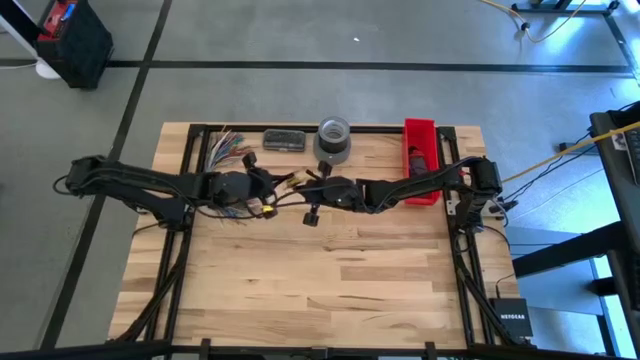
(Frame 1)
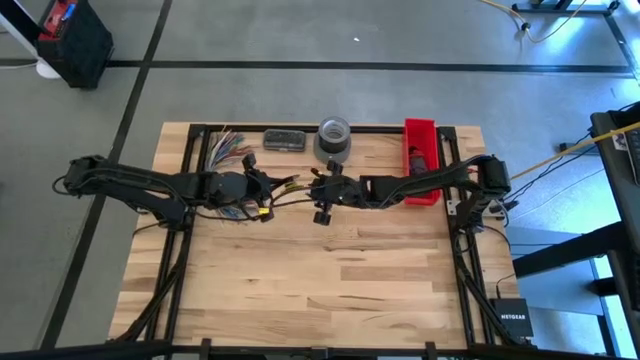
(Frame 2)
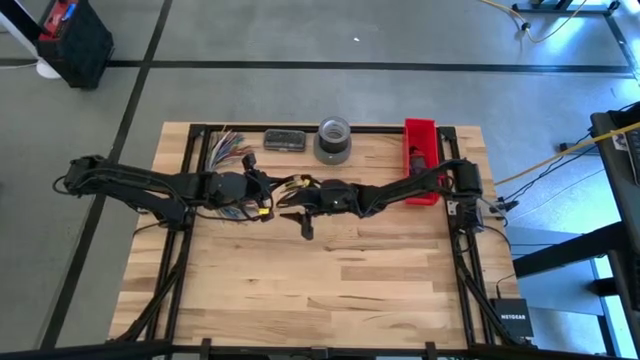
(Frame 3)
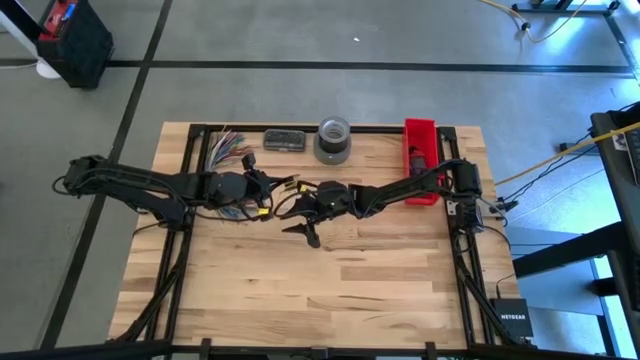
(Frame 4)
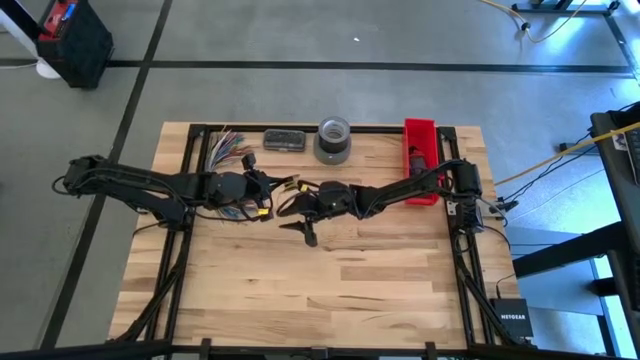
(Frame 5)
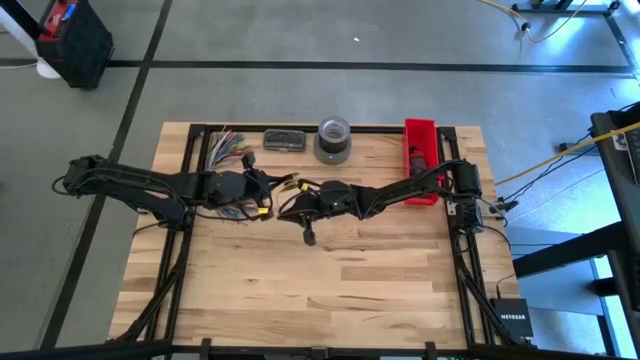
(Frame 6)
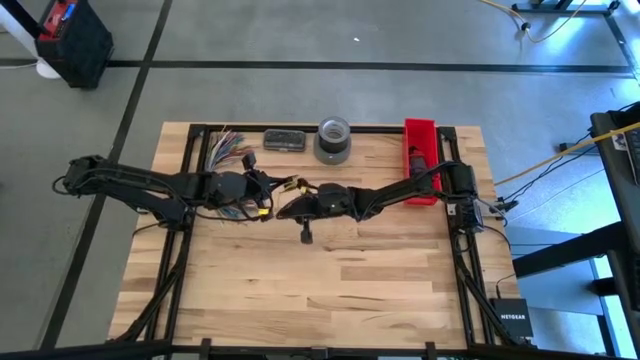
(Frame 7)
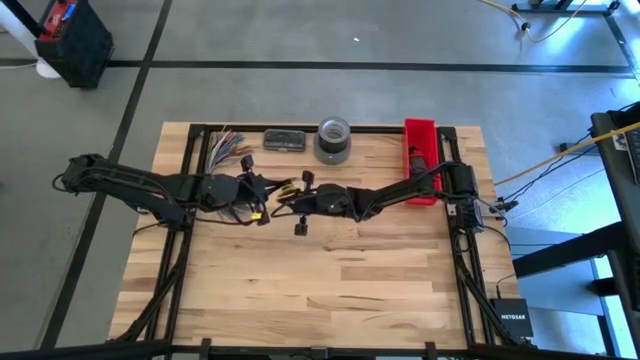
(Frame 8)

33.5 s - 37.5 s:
Task: Coil cords
Coil the yellow wire on the spool

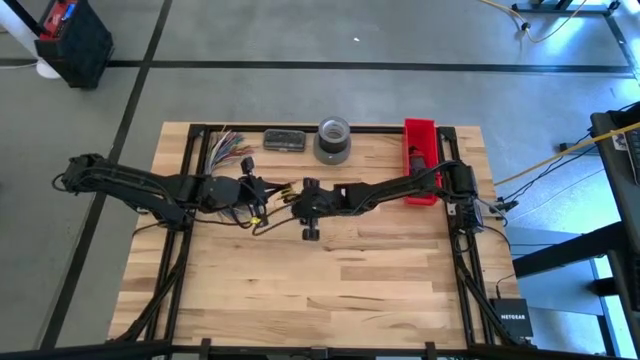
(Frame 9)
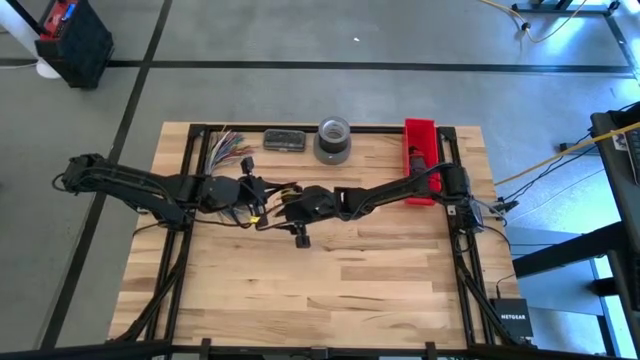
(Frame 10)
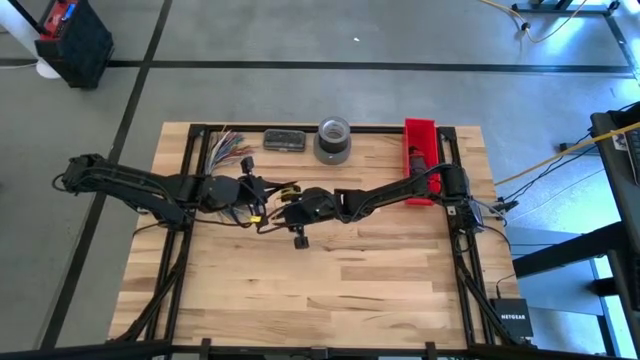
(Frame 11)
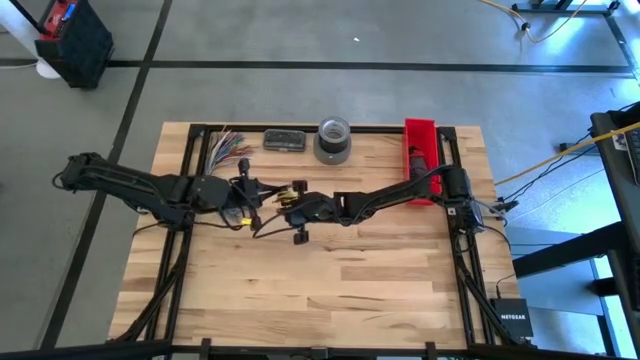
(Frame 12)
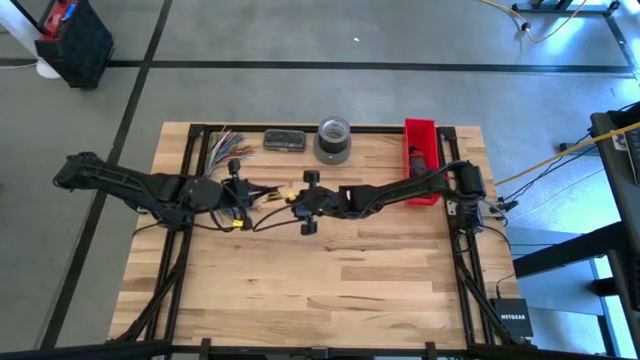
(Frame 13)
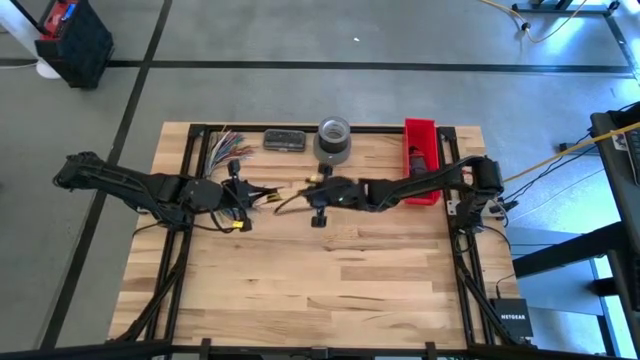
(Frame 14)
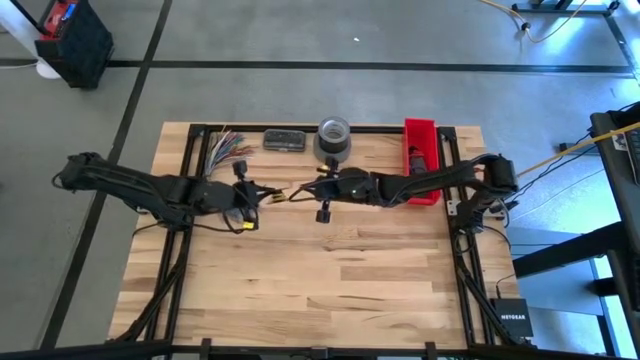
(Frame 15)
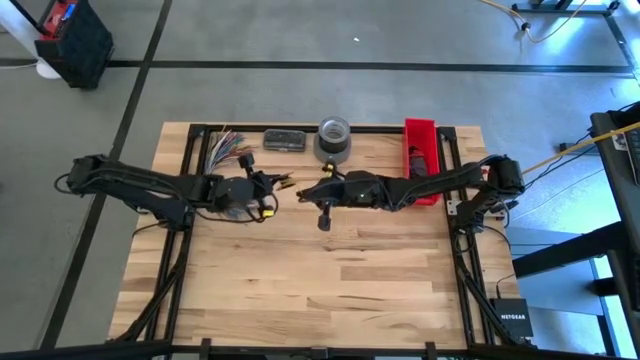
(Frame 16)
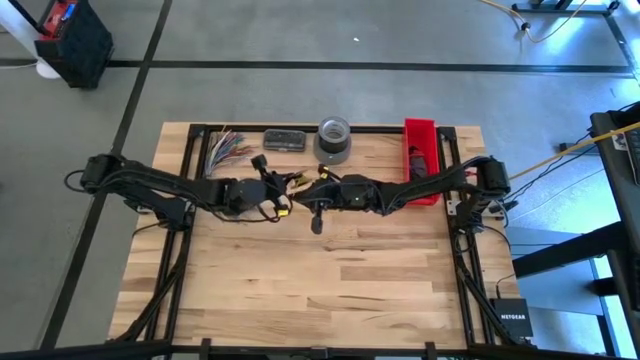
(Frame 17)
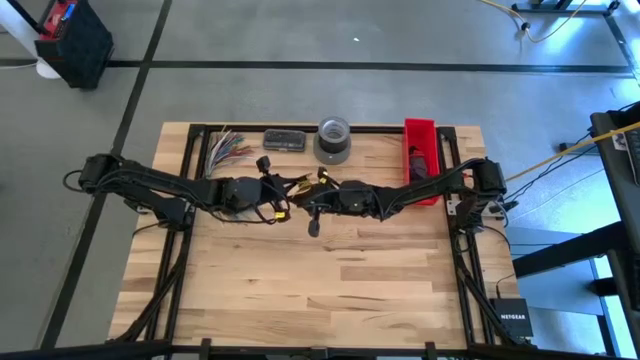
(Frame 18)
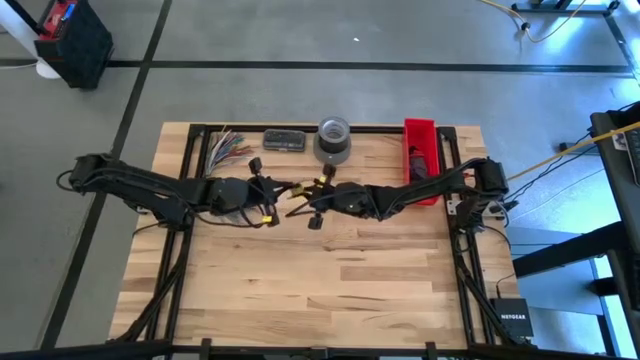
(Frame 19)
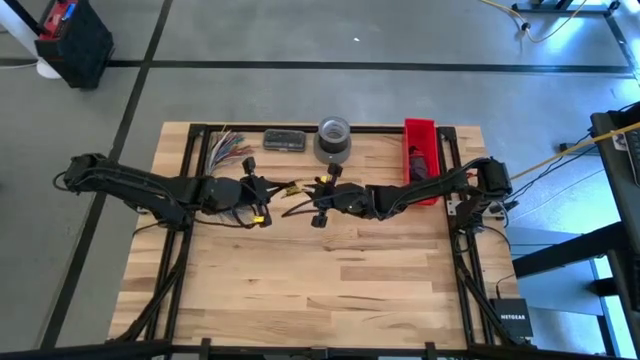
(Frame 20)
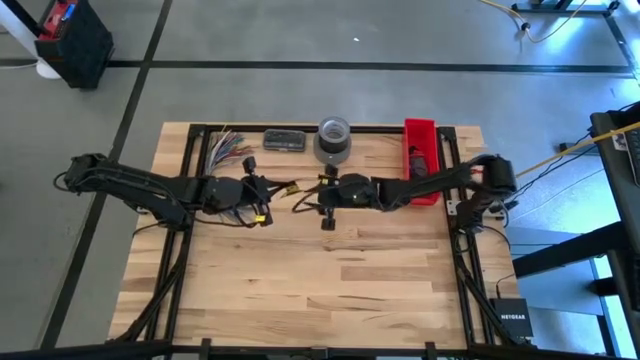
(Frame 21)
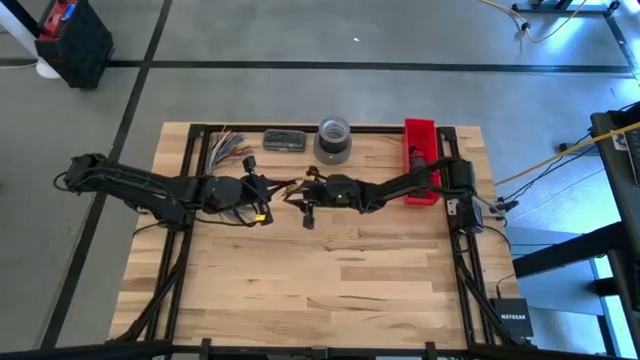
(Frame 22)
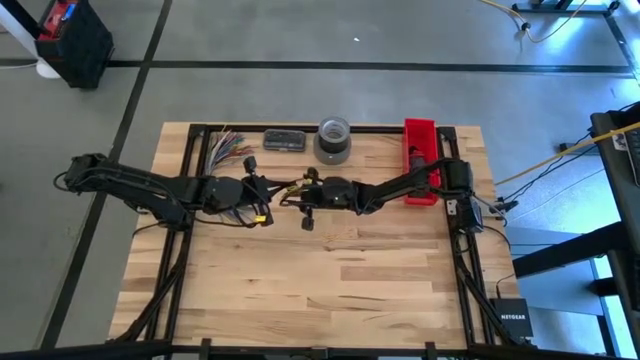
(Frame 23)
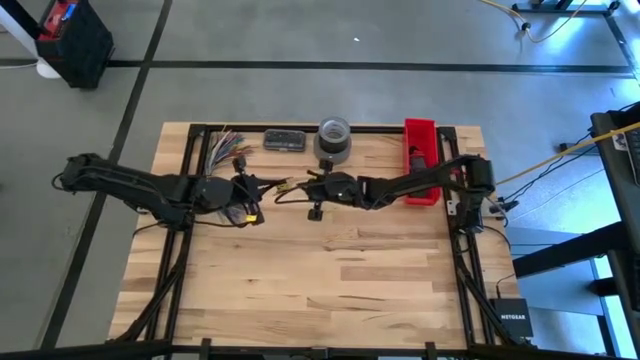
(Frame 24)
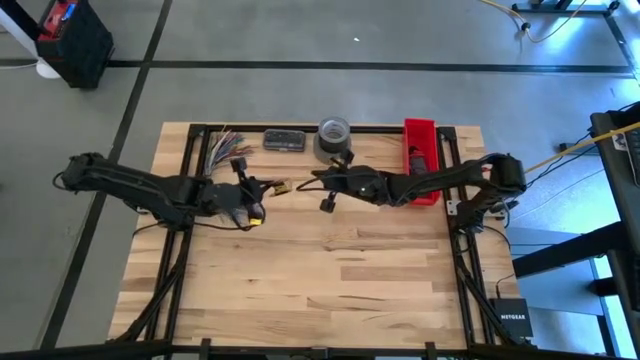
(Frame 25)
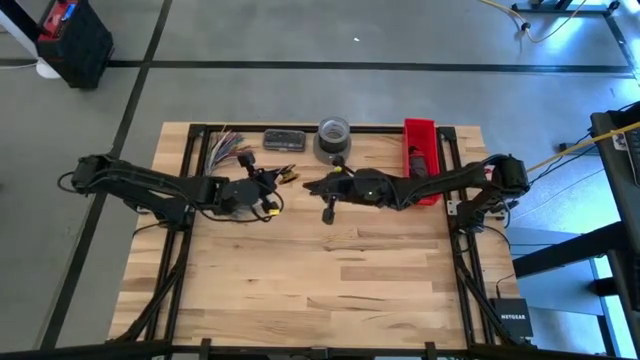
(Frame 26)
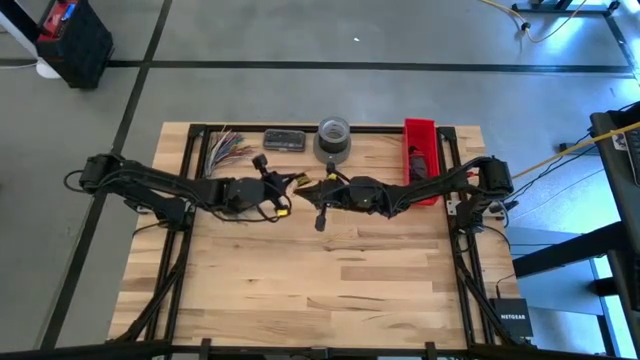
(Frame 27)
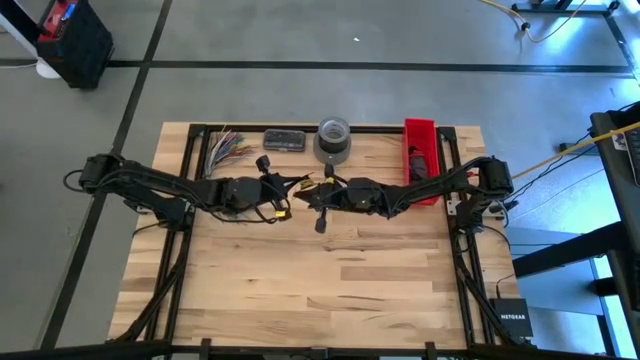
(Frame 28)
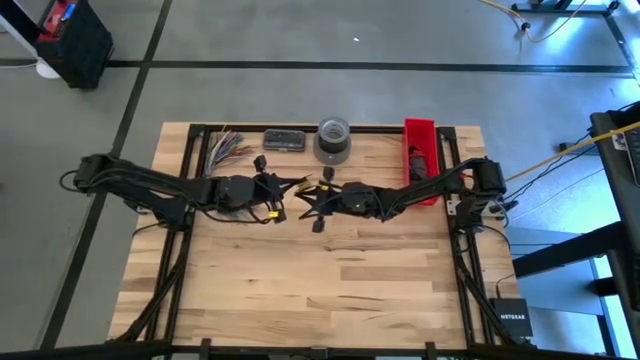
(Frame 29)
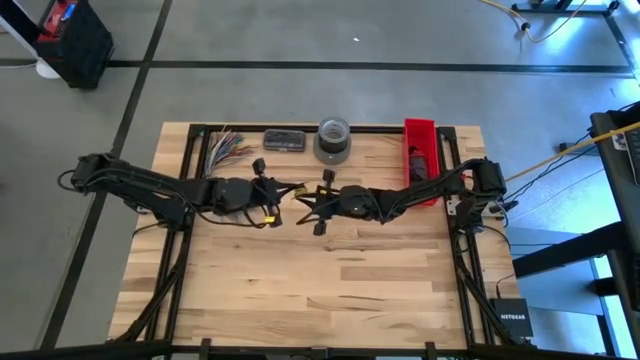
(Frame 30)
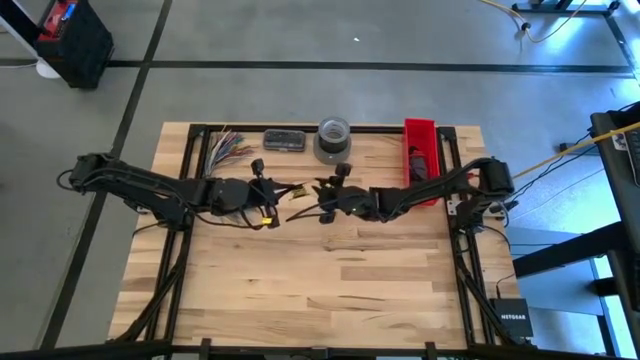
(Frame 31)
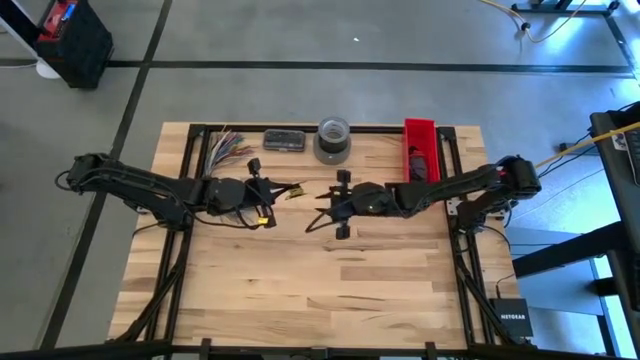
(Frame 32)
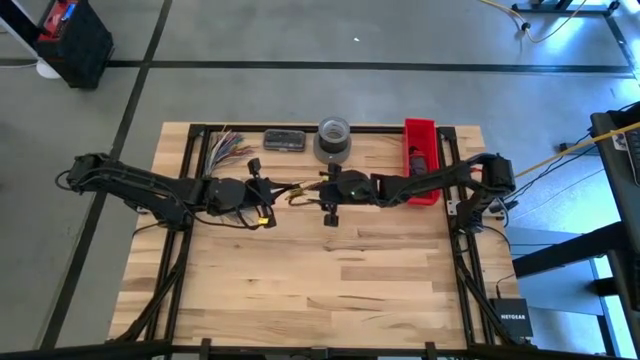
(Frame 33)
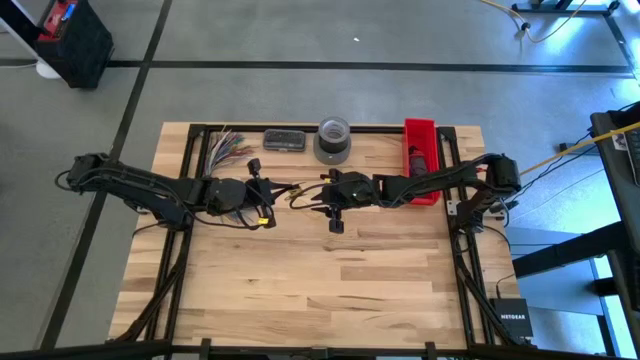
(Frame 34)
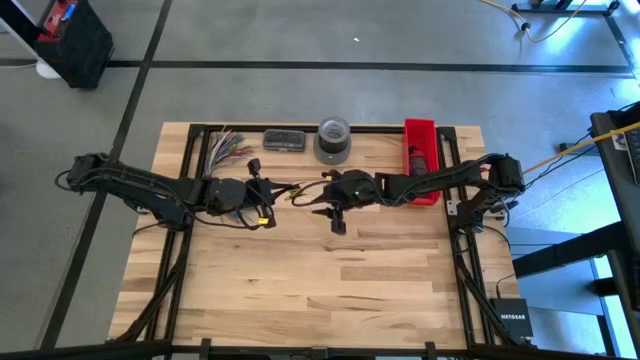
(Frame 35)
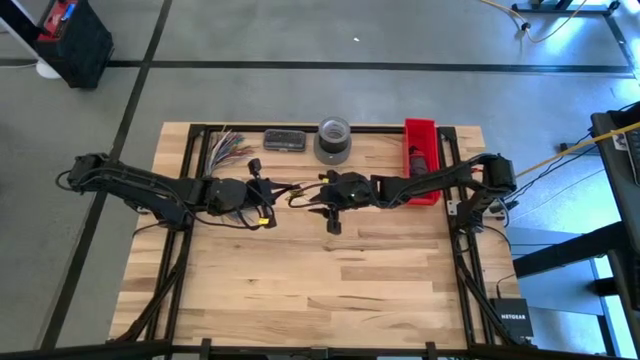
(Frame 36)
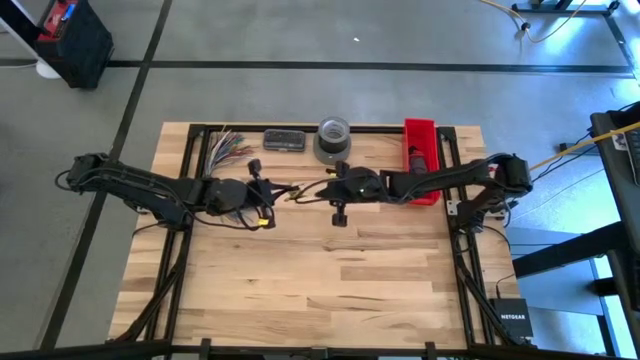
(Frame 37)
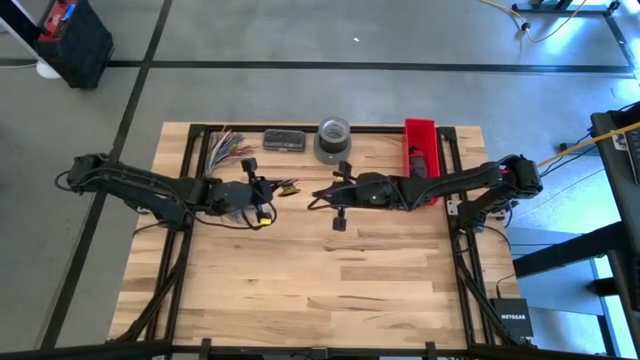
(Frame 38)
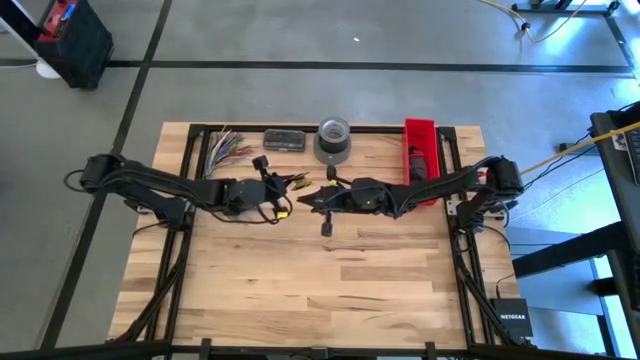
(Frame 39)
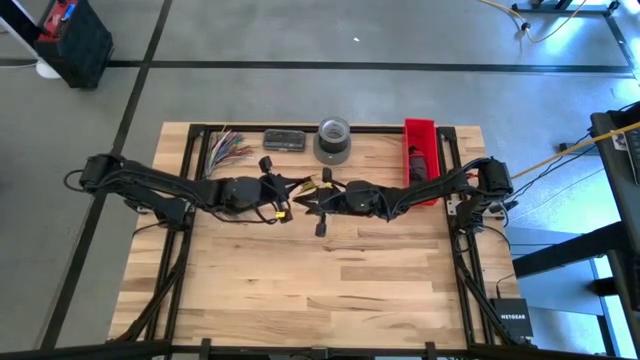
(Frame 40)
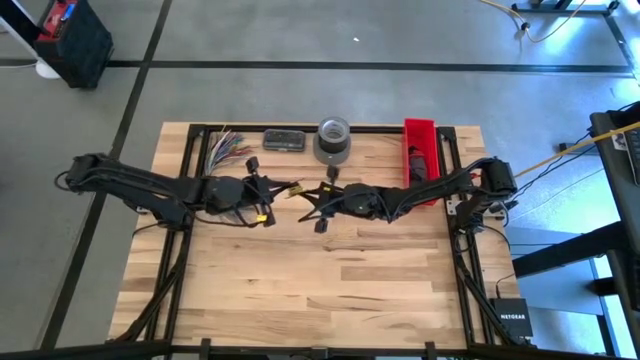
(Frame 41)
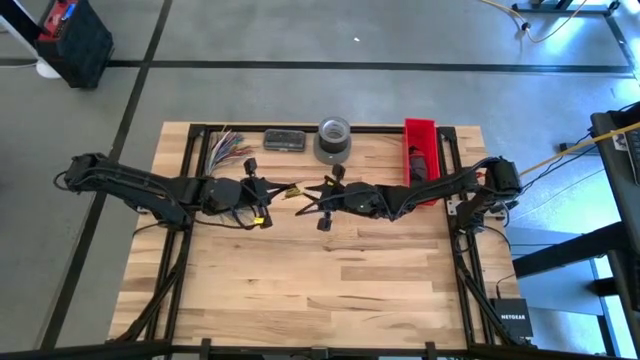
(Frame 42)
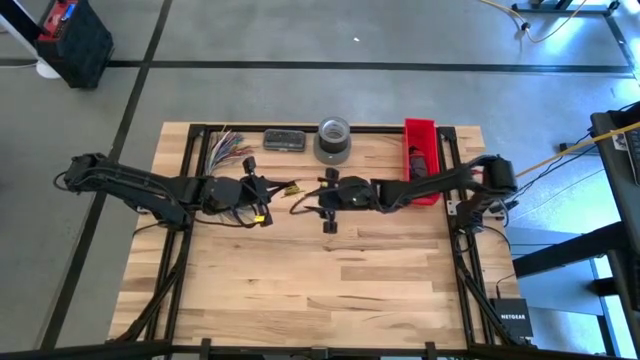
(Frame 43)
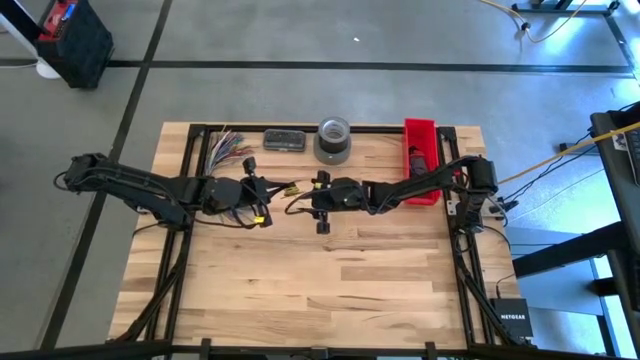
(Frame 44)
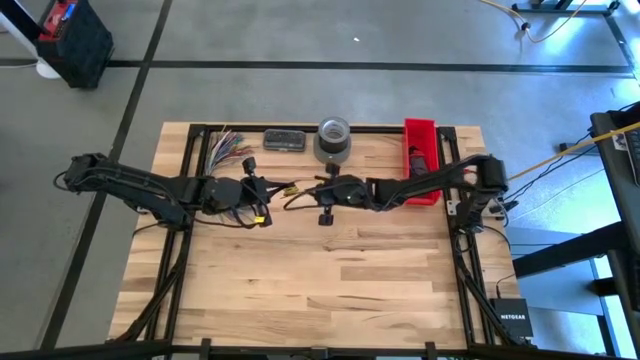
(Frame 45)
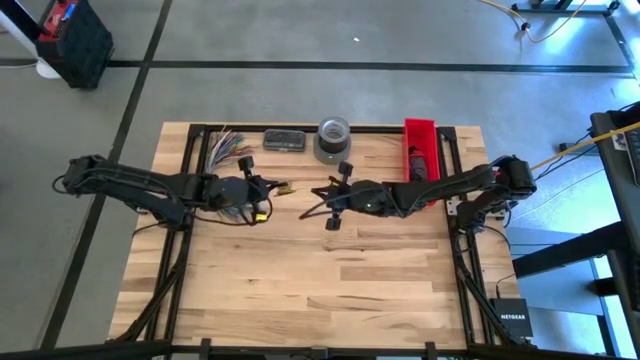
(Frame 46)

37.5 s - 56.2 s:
Coil the yellow wire onto the spool
